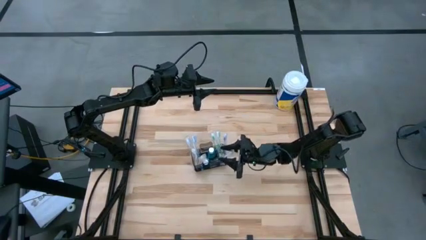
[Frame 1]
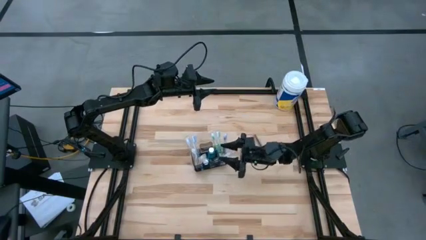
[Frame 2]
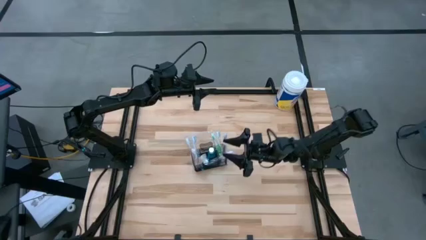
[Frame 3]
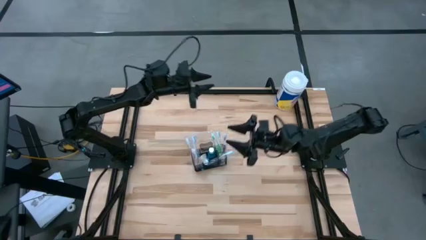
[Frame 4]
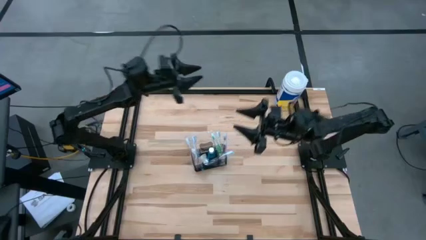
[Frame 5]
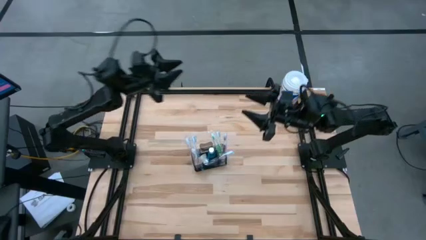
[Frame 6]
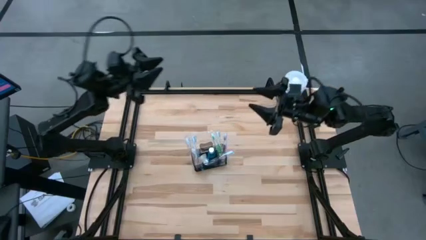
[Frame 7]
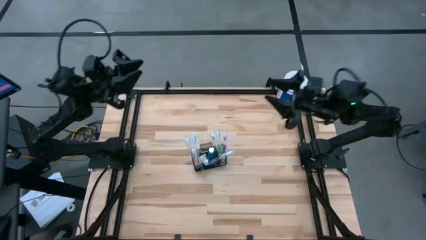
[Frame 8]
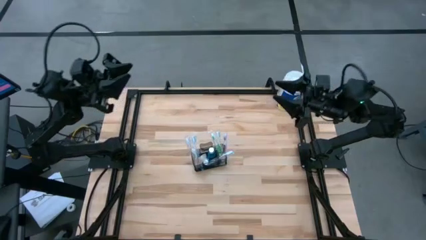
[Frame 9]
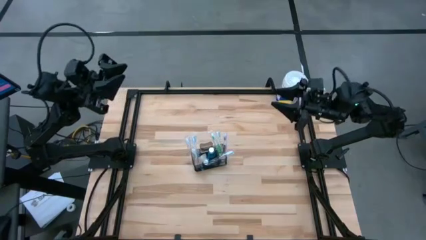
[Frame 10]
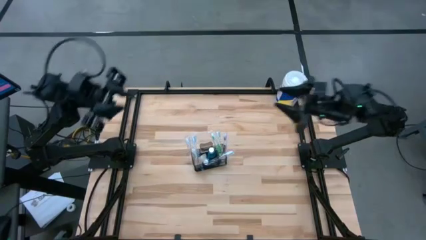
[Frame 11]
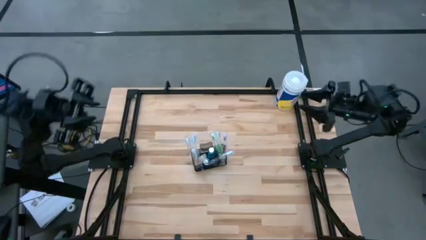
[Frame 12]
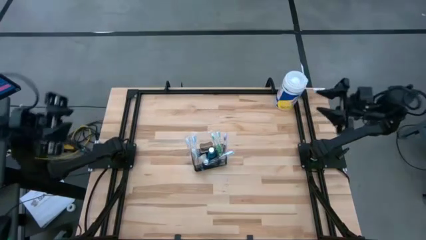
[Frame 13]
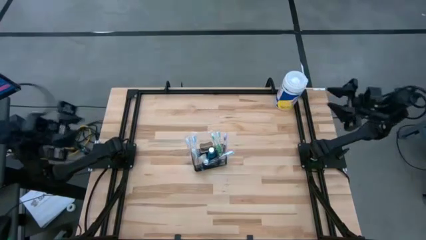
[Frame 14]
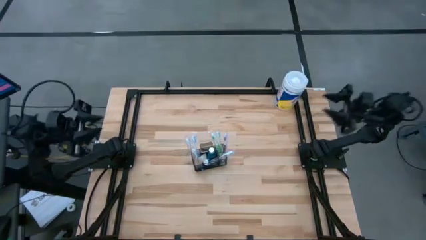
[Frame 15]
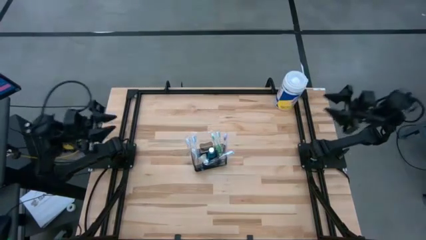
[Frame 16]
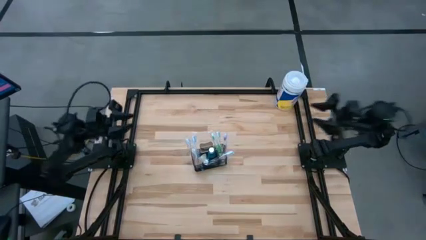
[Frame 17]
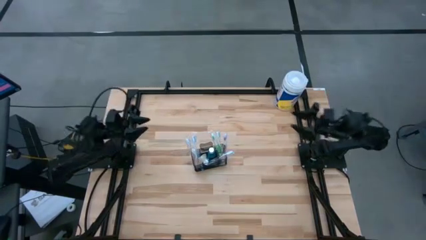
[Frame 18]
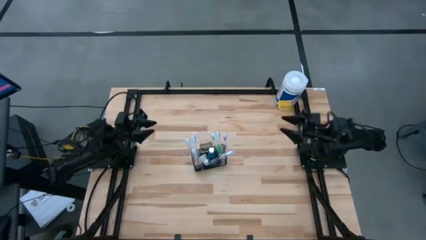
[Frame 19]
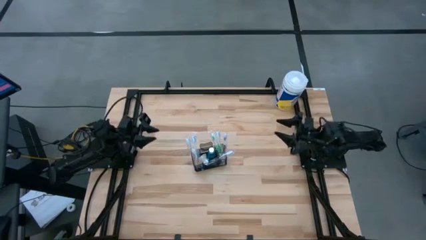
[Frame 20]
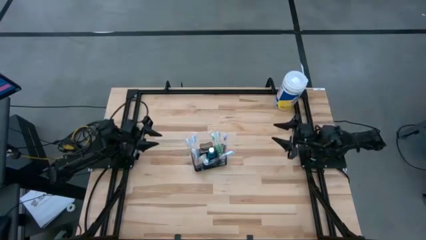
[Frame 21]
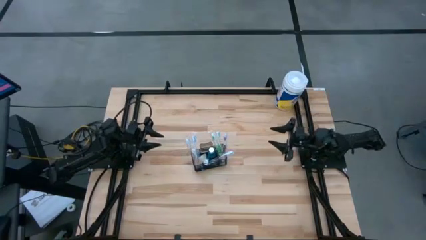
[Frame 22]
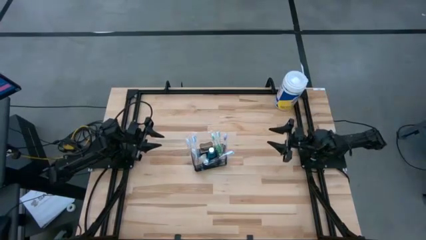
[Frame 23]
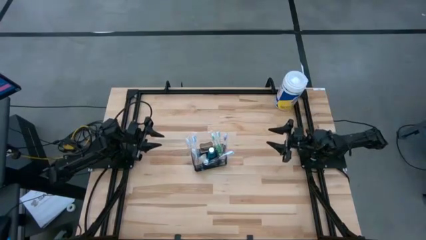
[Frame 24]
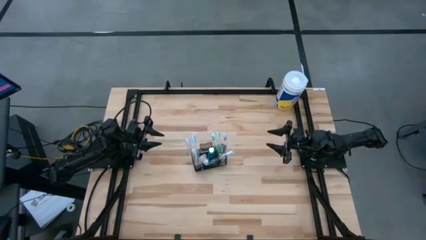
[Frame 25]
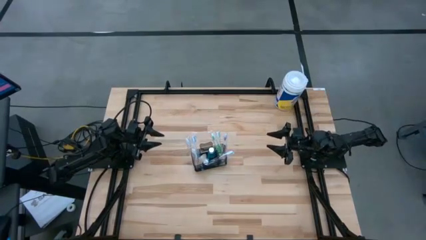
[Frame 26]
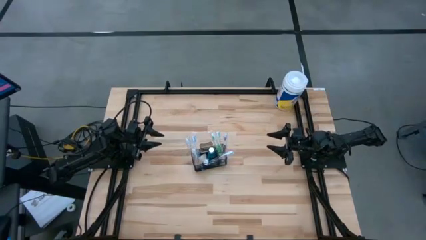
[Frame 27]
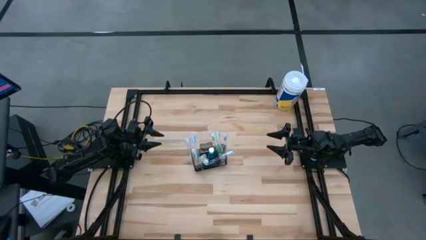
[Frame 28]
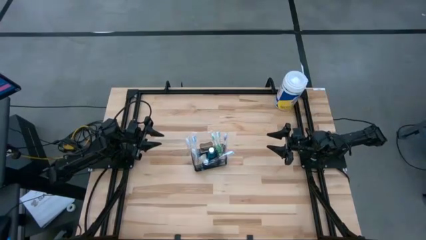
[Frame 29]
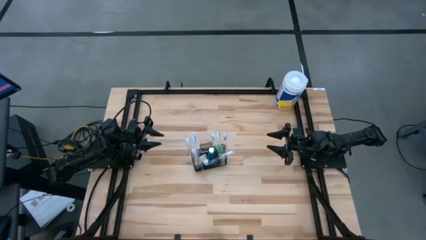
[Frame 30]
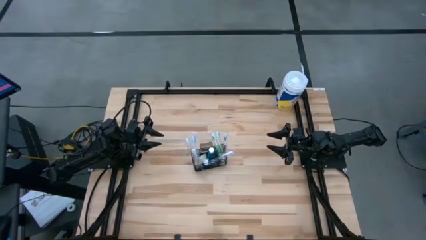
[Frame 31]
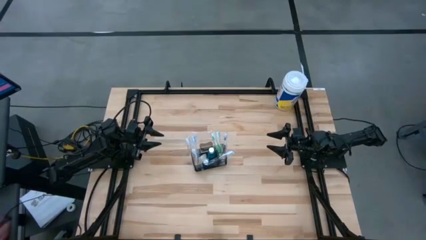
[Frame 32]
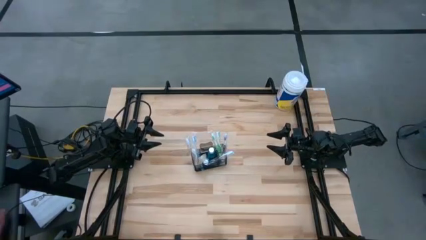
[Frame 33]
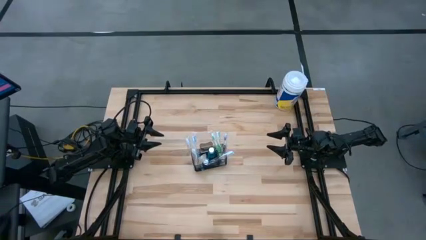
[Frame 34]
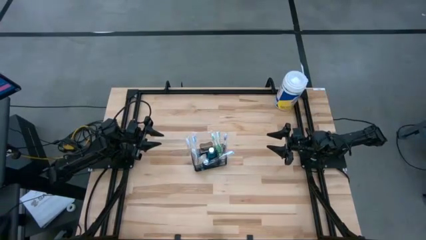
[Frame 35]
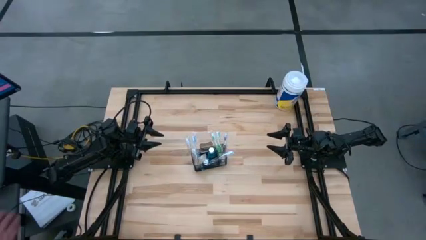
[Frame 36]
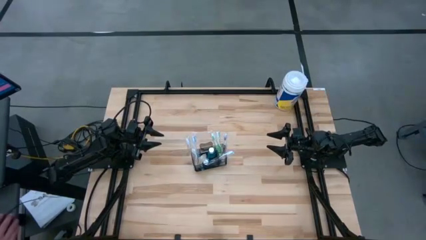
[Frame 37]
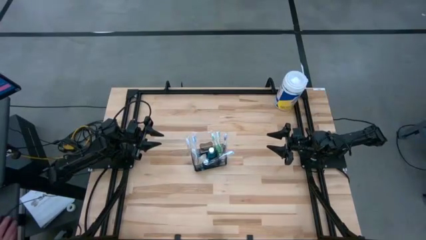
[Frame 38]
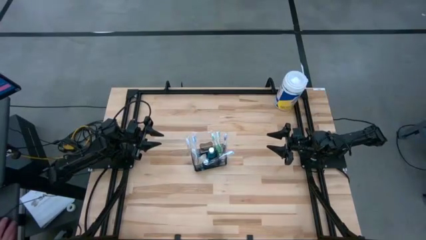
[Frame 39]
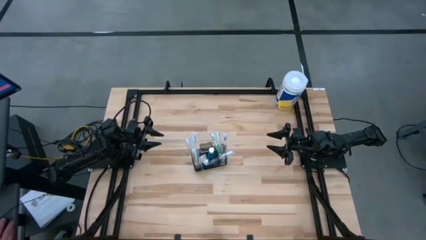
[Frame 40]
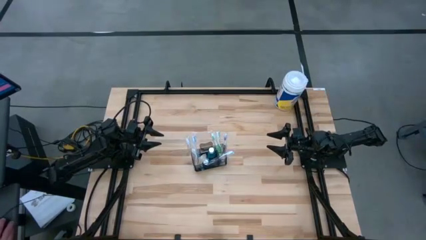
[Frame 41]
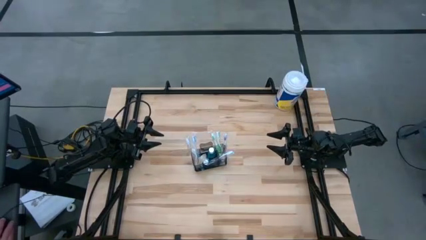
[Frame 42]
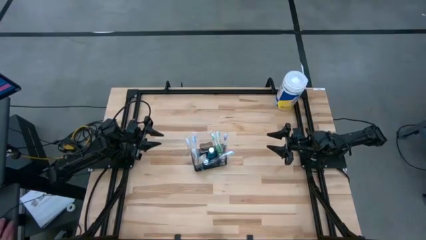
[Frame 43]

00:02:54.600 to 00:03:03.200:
Task: Pick & Place toothbrushing station
Return to Home Position

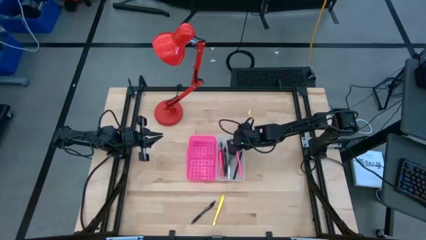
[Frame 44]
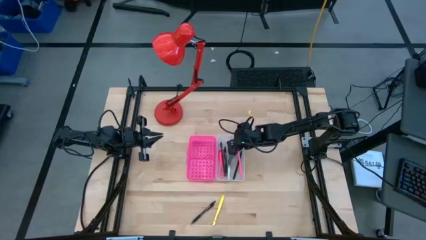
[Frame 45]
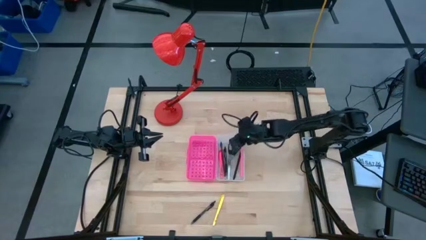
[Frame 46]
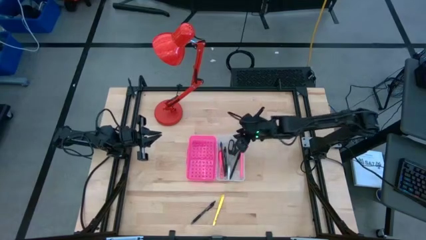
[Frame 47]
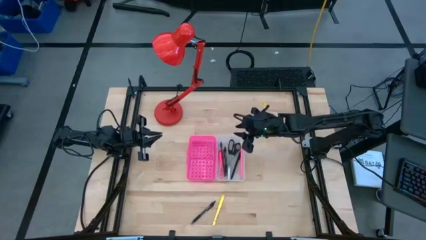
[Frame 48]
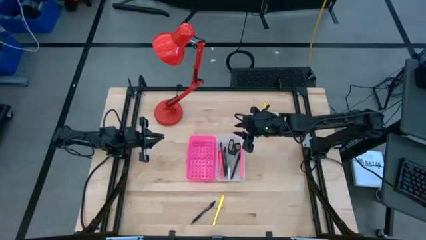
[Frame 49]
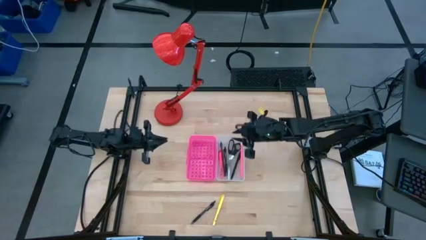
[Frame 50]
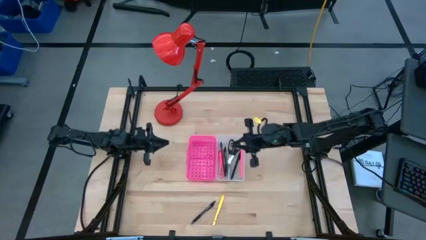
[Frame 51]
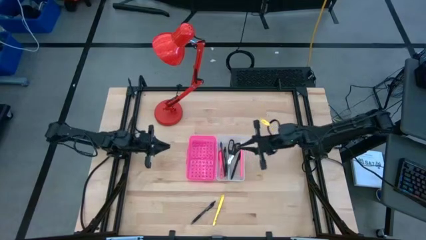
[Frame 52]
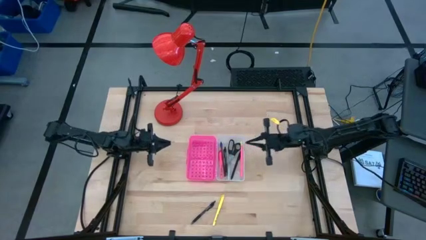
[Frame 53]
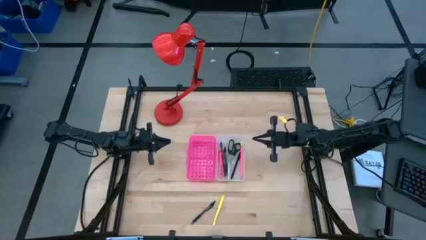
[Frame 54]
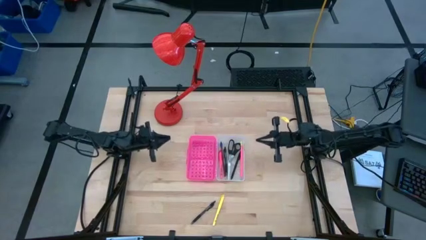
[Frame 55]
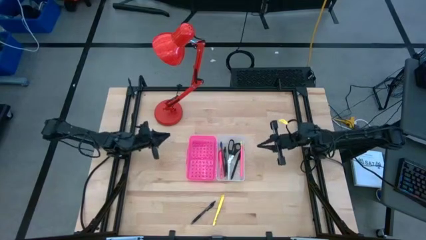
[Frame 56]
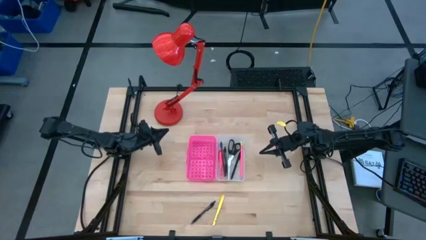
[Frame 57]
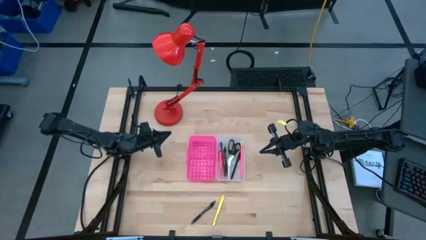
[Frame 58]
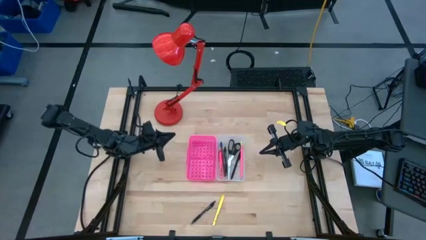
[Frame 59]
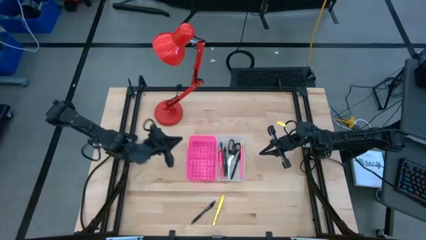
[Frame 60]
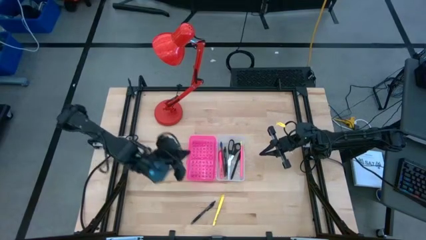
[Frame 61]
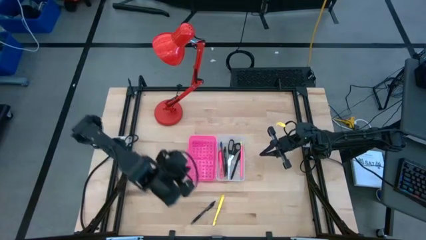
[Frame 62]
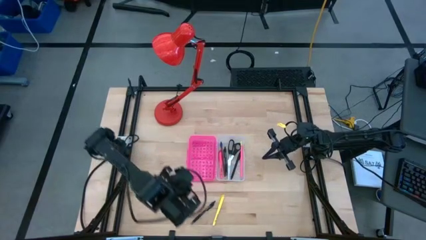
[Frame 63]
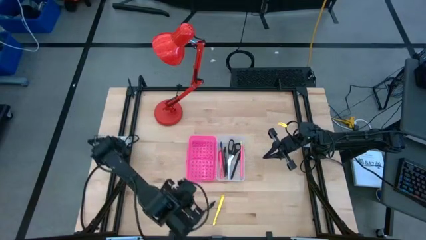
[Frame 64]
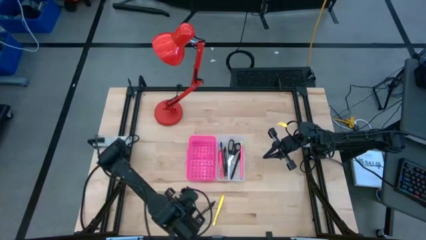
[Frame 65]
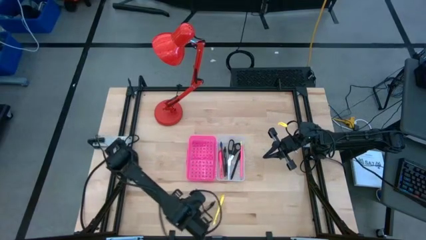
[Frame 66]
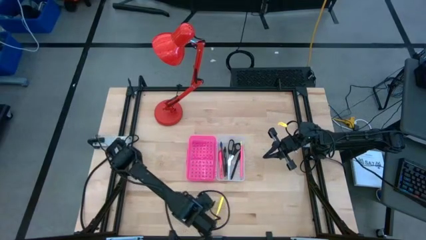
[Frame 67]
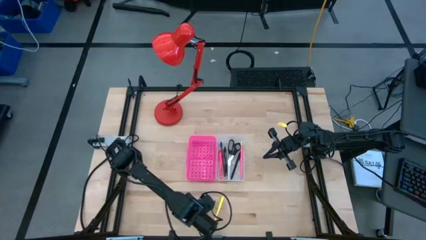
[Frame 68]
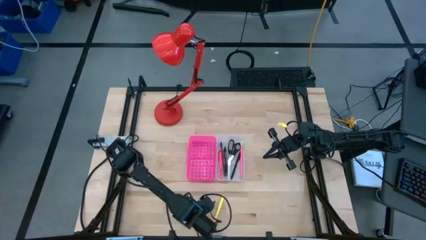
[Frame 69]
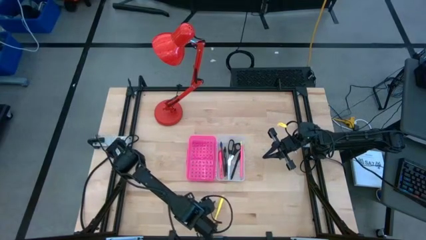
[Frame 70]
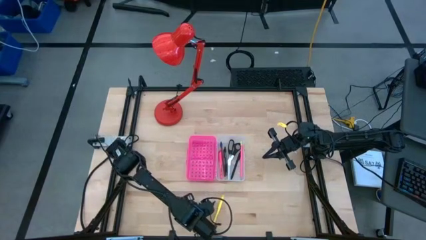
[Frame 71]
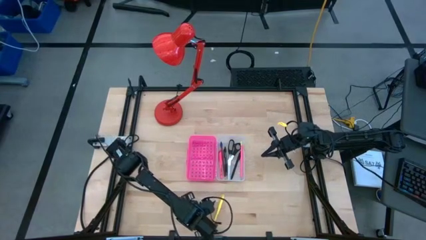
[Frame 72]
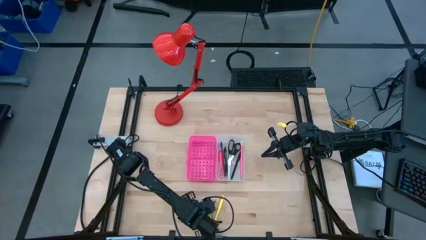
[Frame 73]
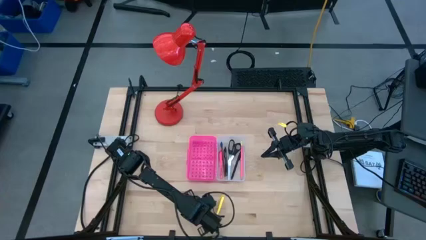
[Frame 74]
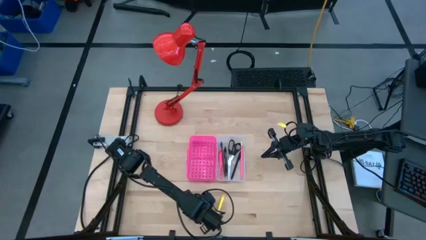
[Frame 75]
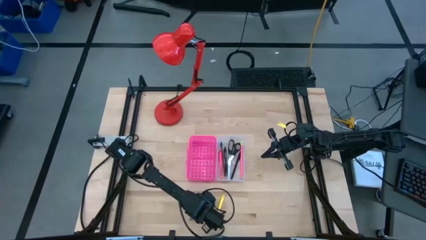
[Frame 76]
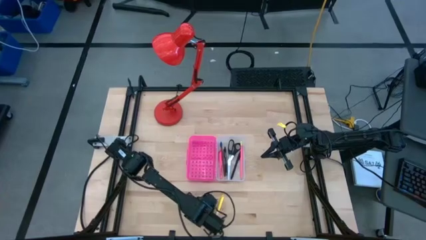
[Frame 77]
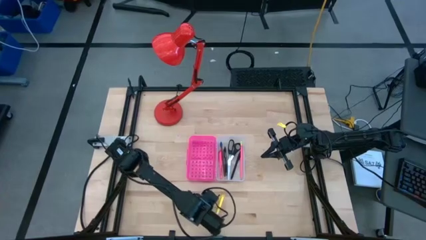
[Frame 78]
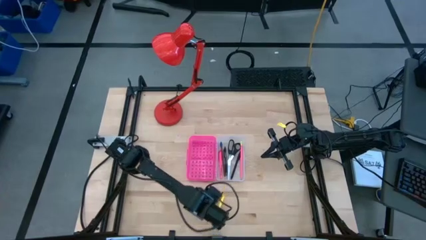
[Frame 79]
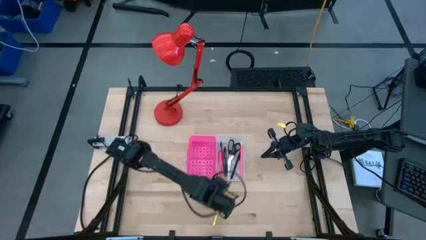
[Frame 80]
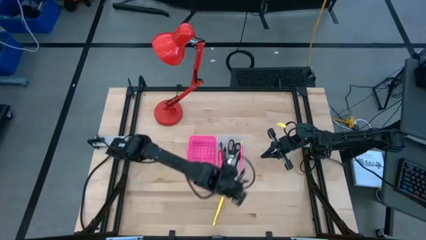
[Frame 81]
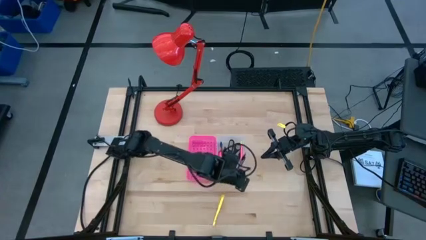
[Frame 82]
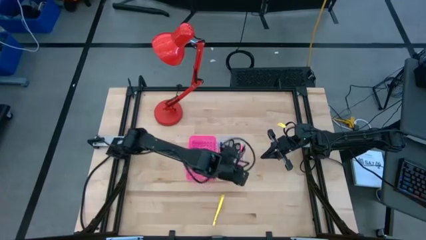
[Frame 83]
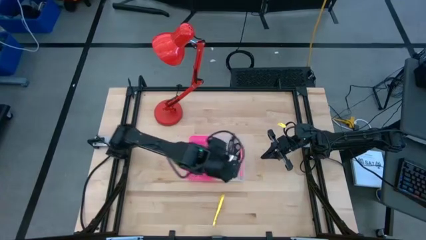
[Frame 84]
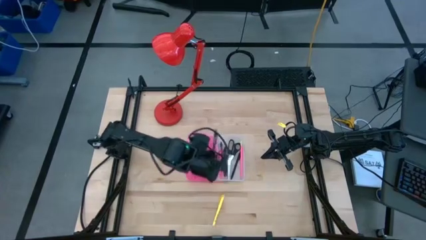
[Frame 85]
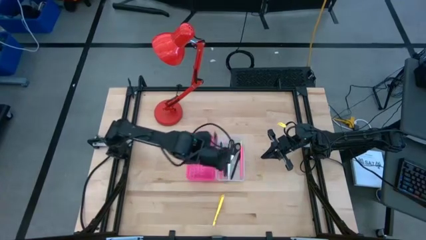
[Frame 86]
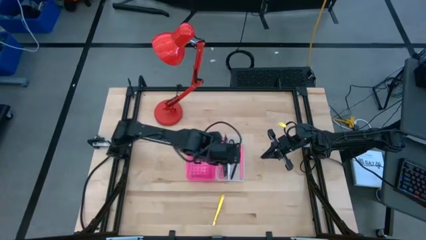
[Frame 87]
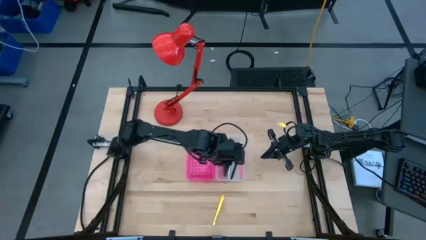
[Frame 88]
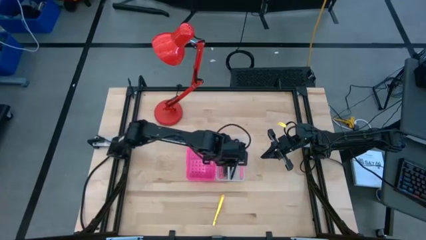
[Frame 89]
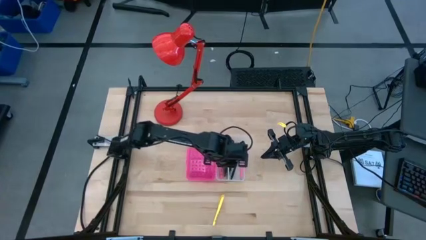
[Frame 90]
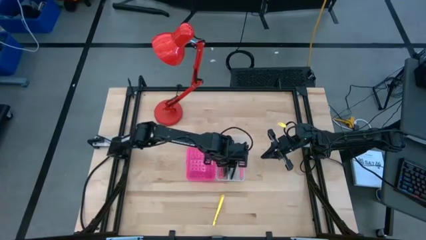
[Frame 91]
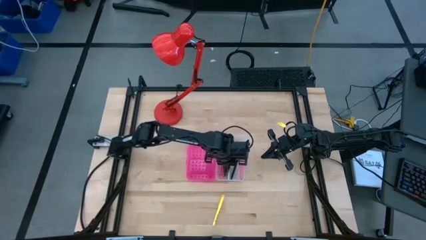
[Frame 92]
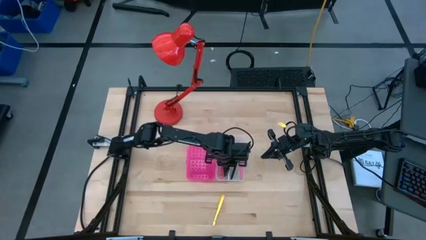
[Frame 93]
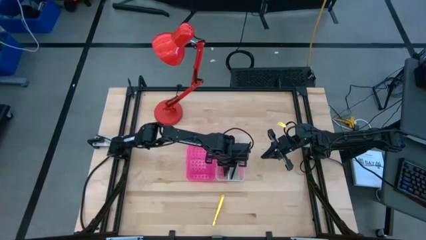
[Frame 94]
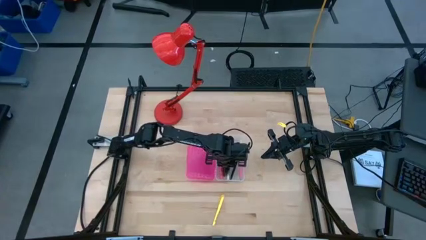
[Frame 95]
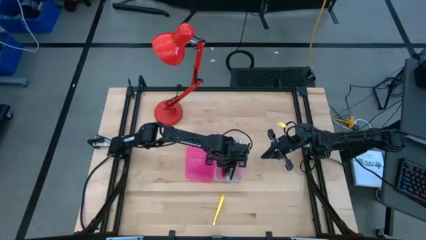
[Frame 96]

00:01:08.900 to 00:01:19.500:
Task: Pick & place school supplies into a supply box
Put the black pen in the pink box
